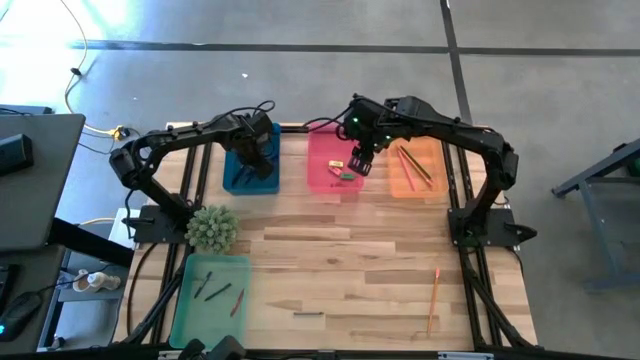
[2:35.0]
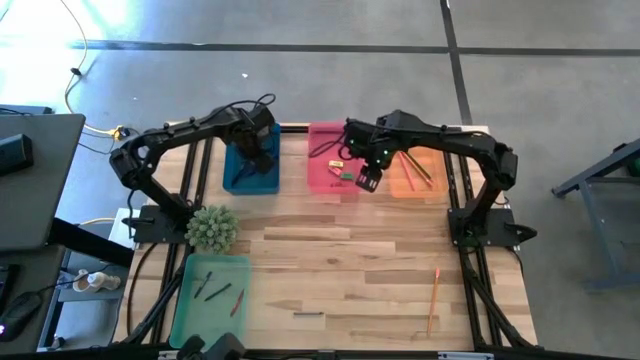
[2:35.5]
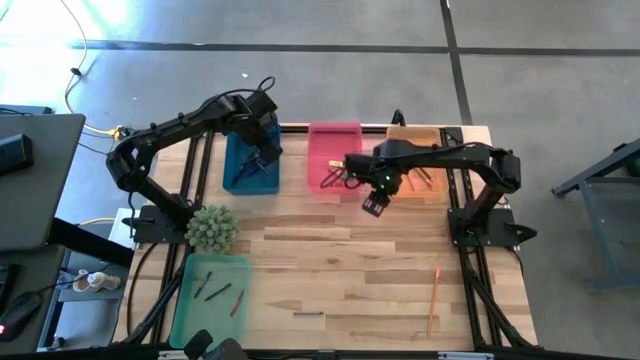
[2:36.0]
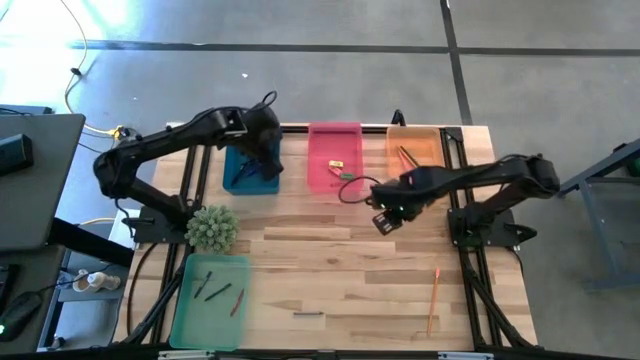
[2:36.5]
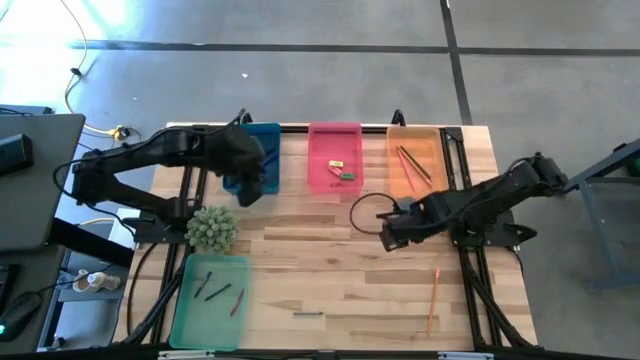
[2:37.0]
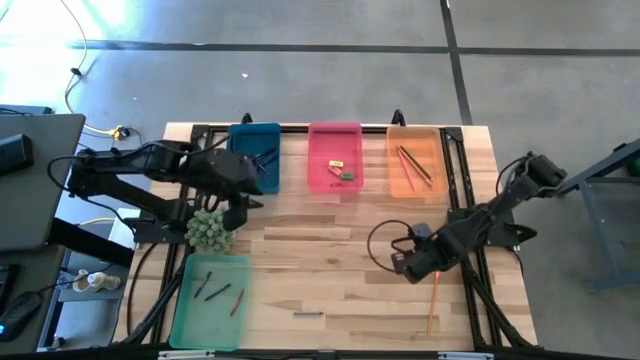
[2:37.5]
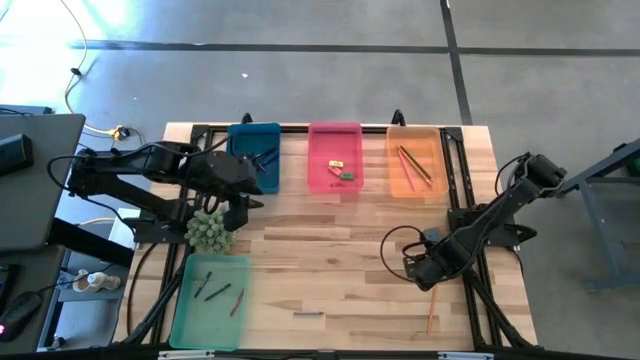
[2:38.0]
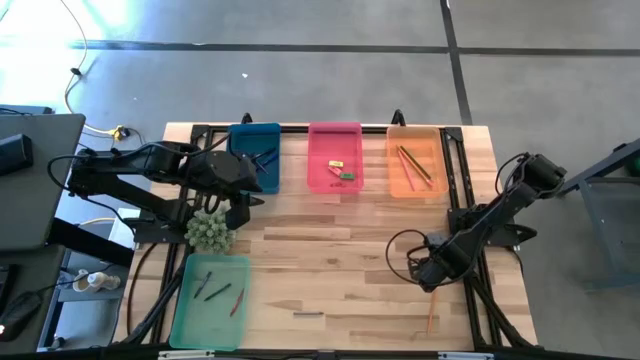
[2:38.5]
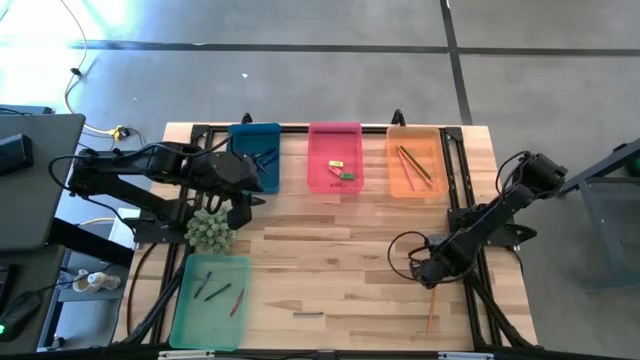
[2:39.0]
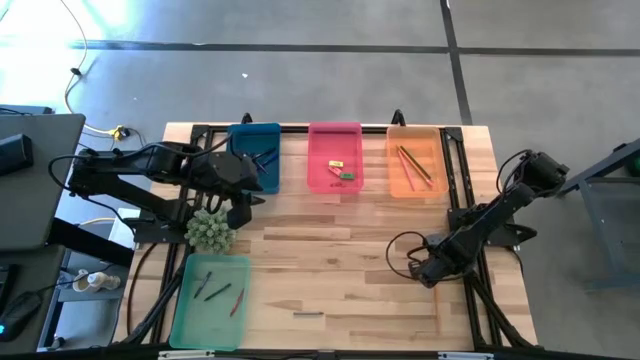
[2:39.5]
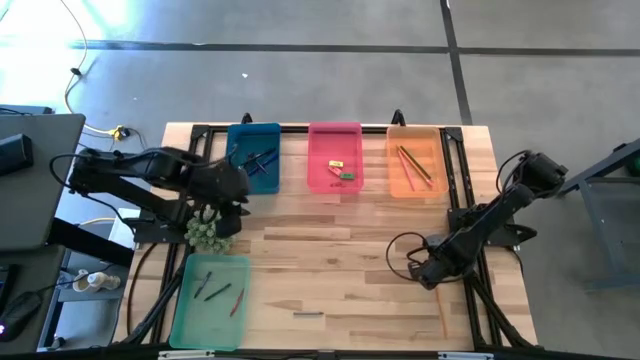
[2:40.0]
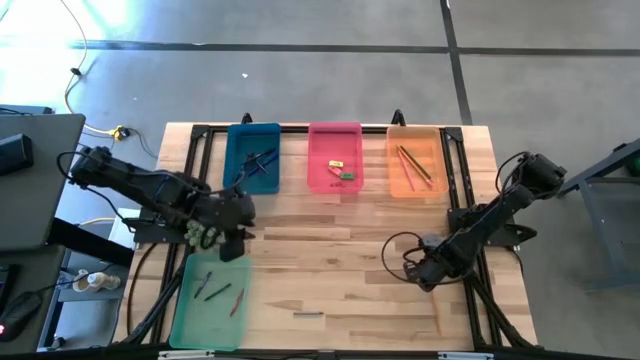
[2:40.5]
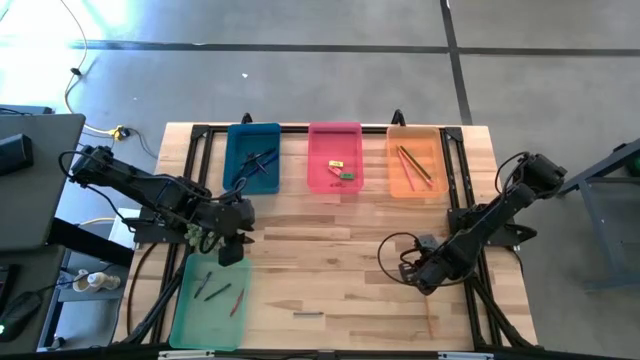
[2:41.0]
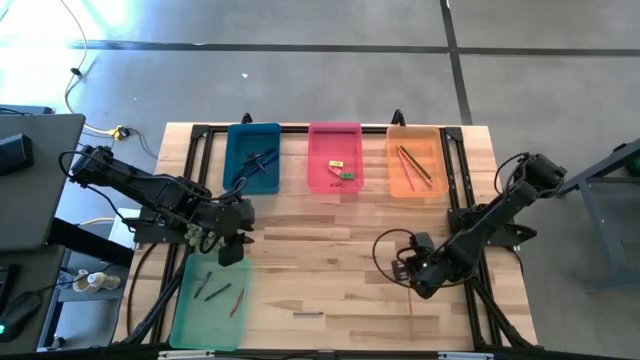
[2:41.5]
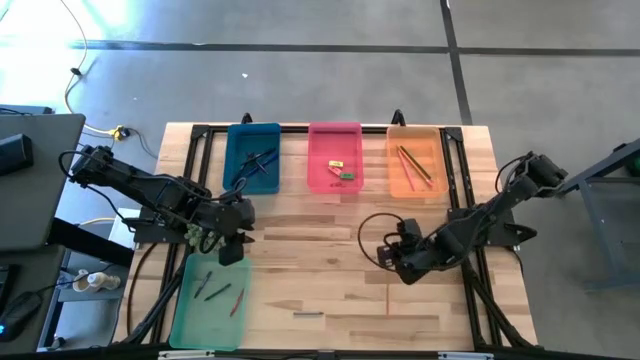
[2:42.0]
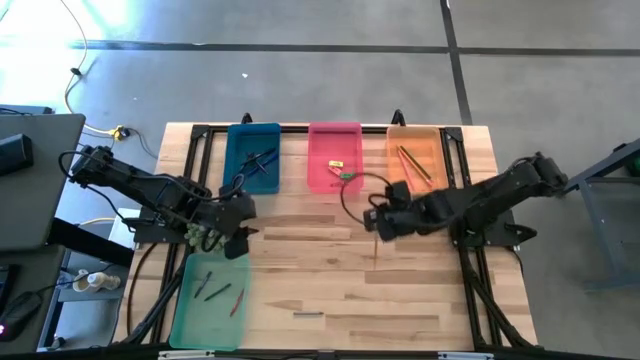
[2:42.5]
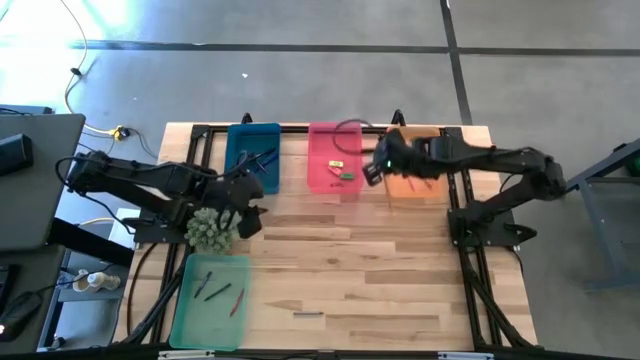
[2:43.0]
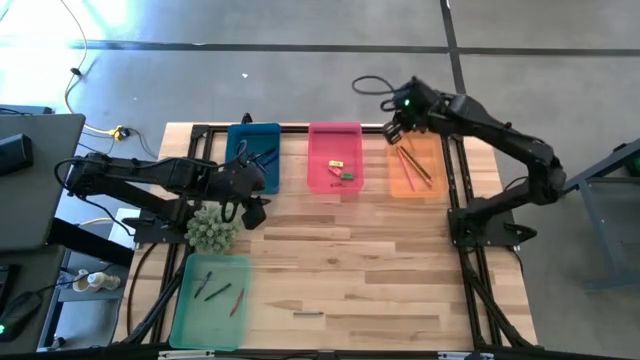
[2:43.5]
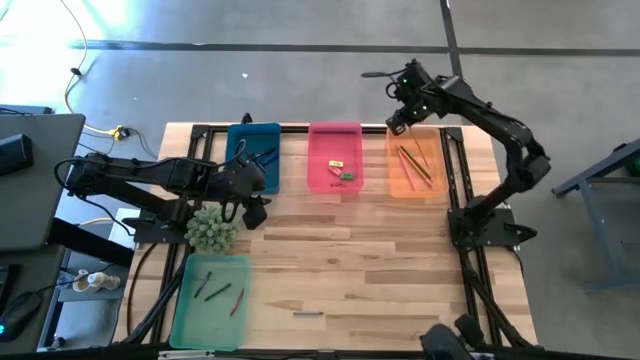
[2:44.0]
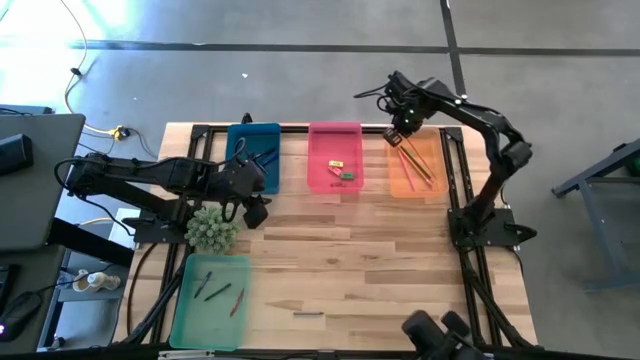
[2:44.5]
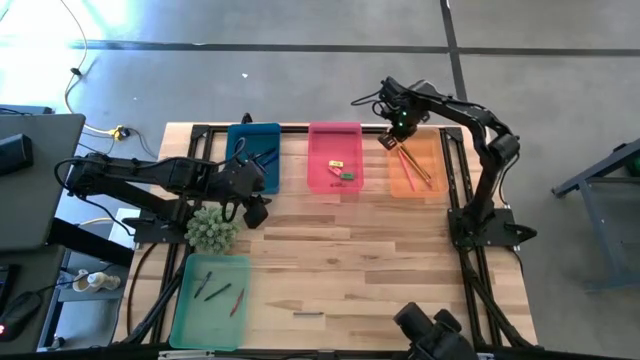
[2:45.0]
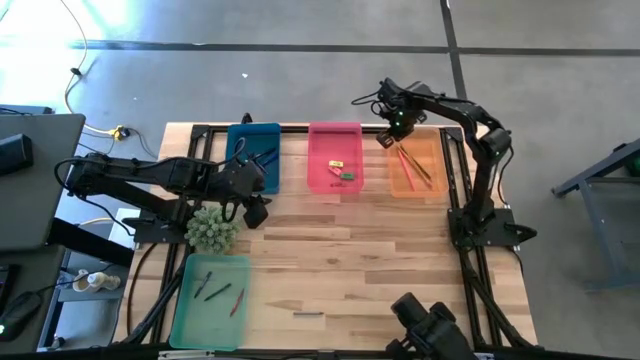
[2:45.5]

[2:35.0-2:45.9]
Task: Sort crayons/erasers/pens/pencils in bins
Put the yellow pencil into the orange bin

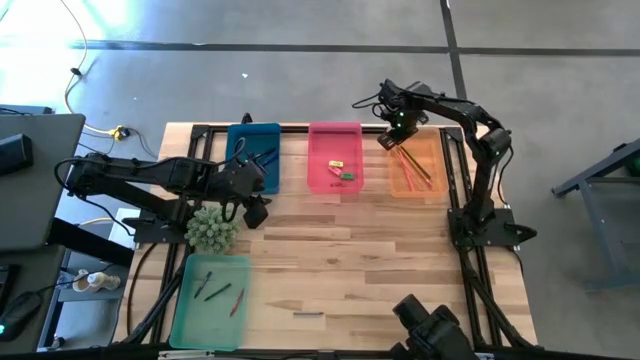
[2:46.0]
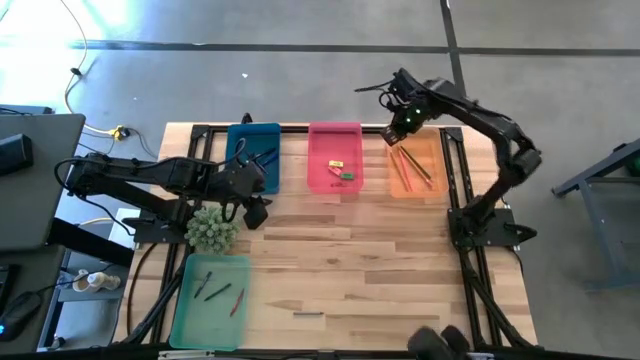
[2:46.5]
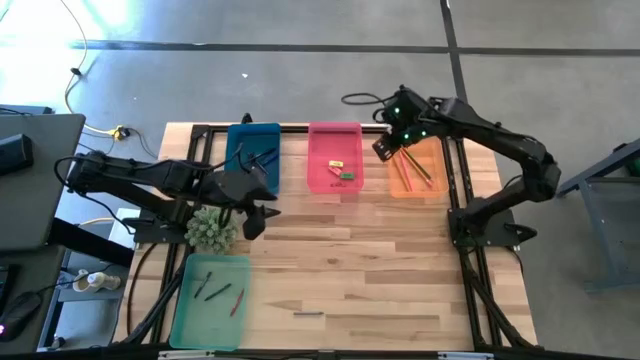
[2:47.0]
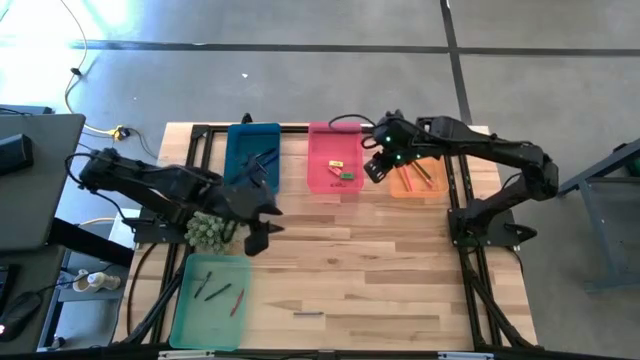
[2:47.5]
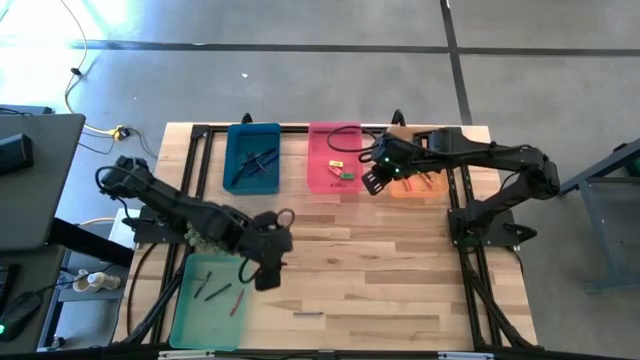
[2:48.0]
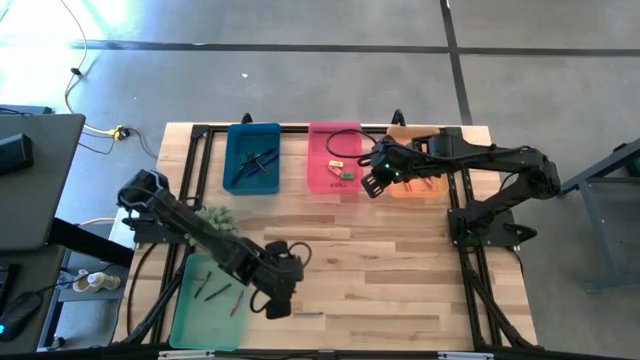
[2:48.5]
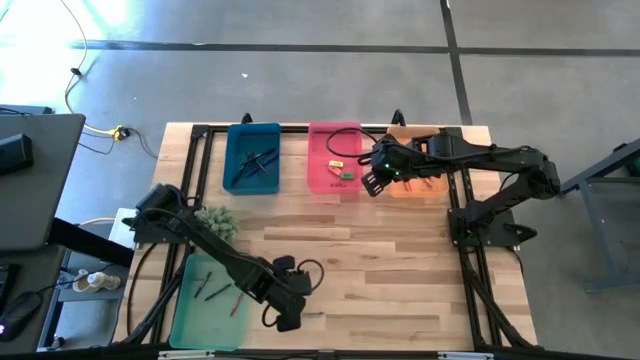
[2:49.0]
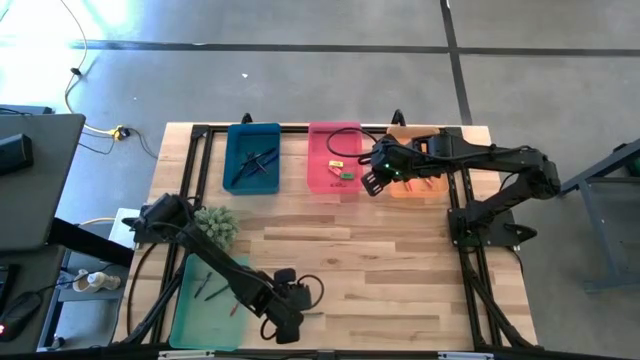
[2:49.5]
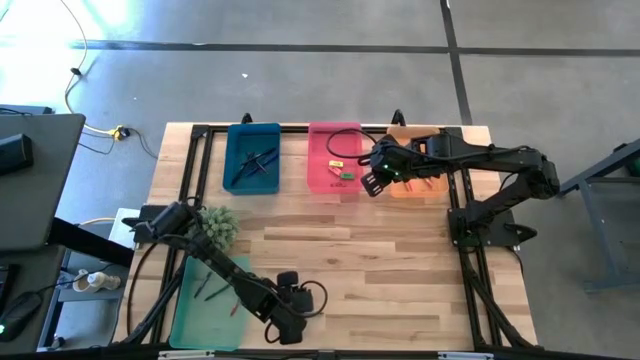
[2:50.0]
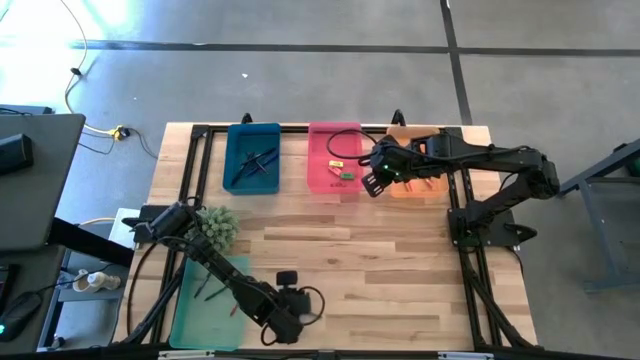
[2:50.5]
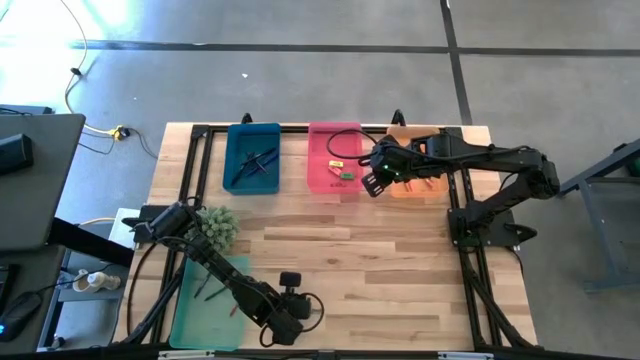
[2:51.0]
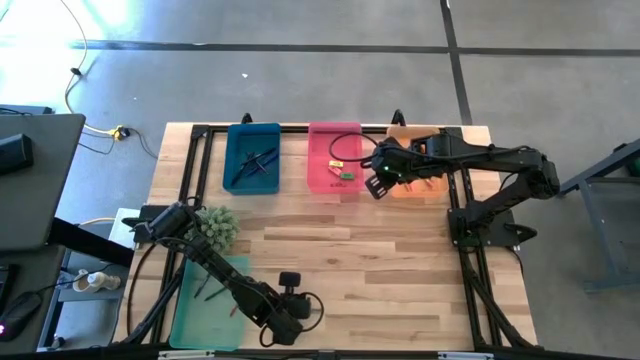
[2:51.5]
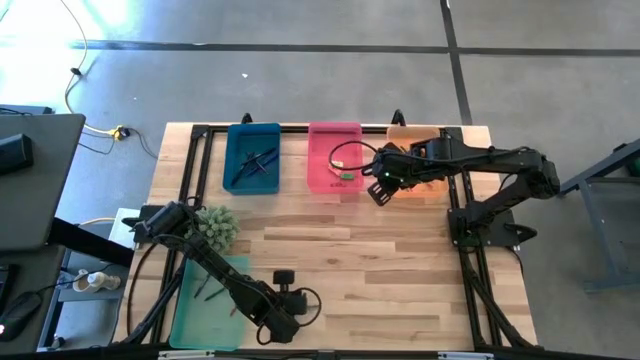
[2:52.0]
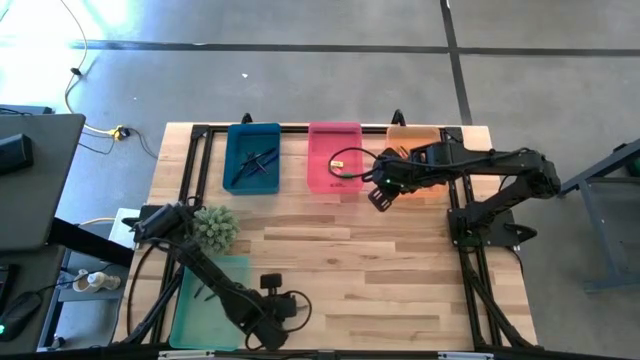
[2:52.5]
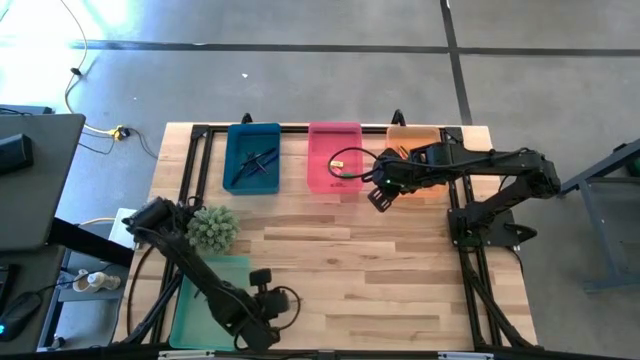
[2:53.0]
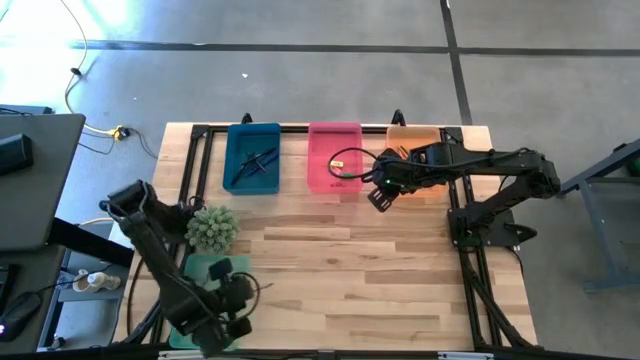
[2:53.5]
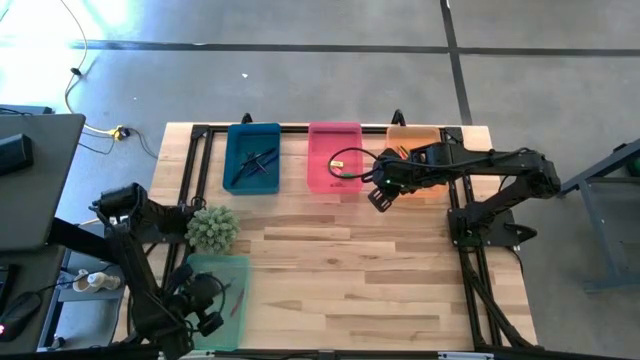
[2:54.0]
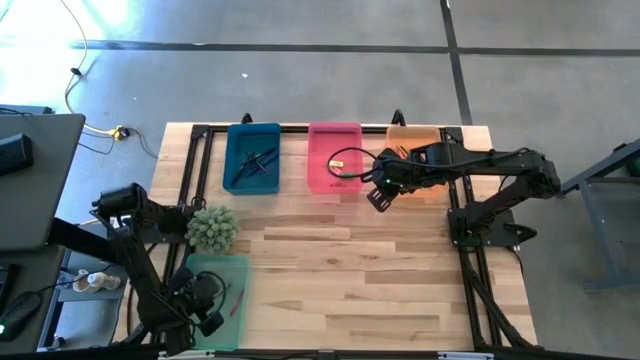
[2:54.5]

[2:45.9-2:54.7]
Put the gray crayon into the green bin
